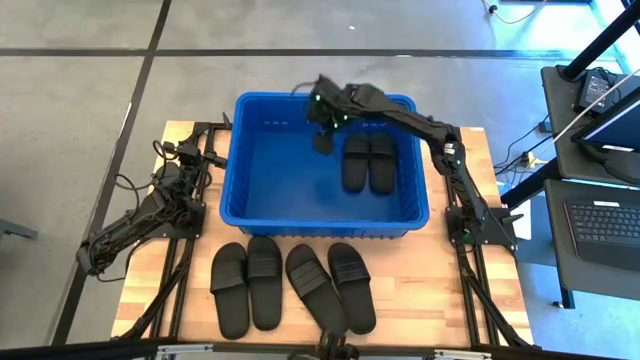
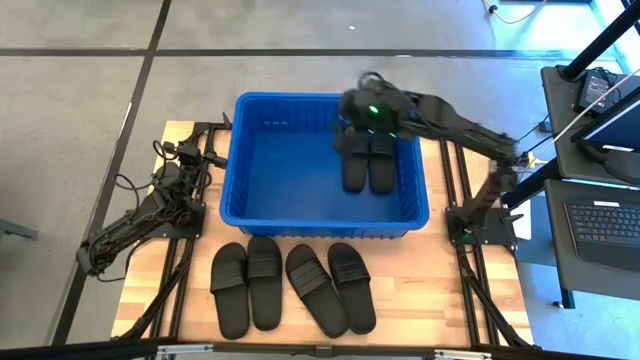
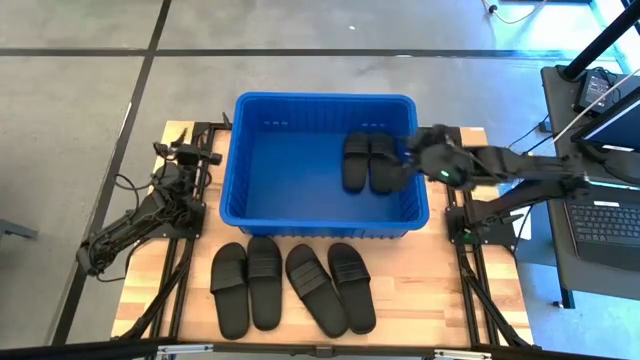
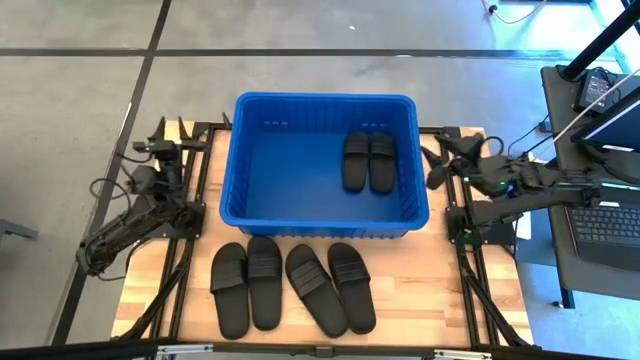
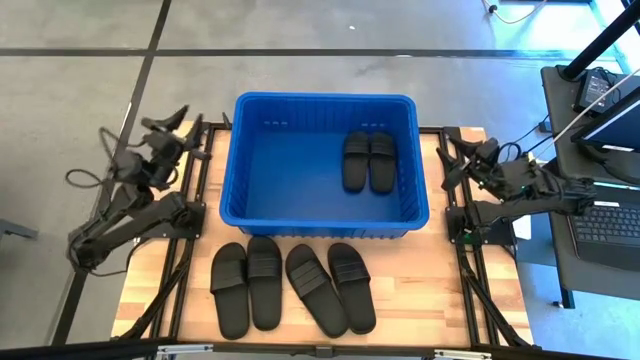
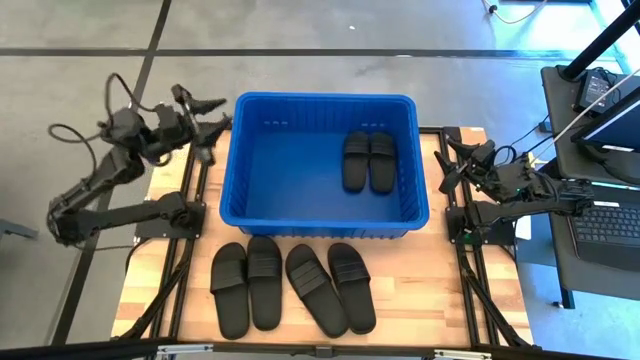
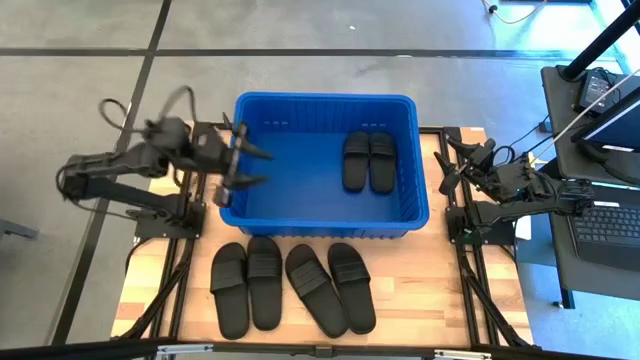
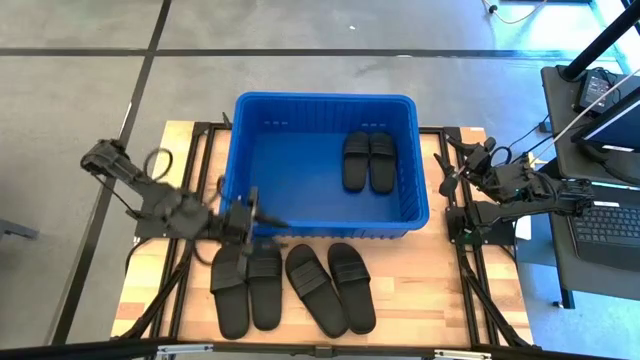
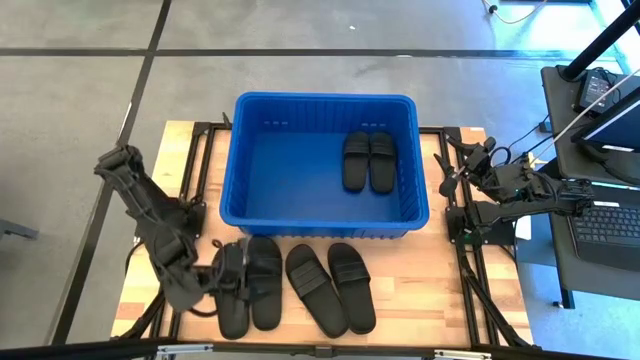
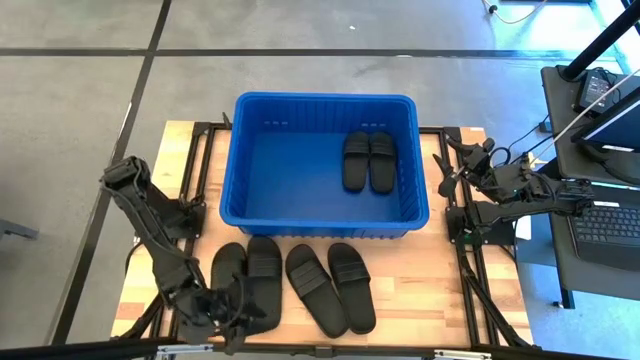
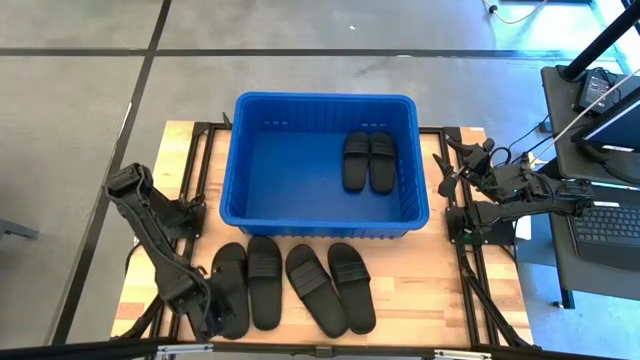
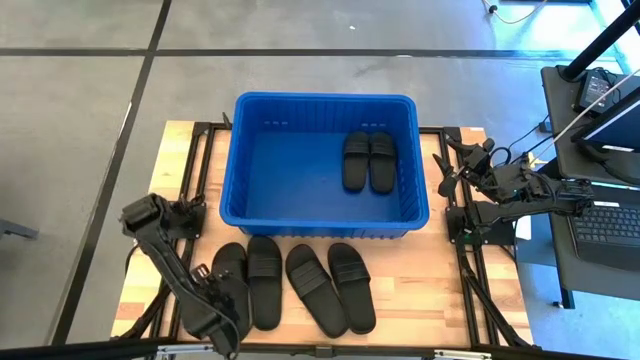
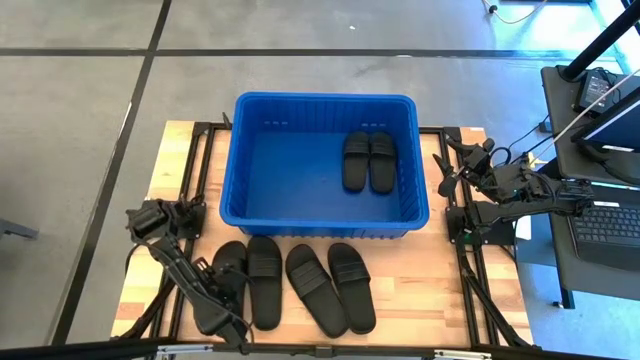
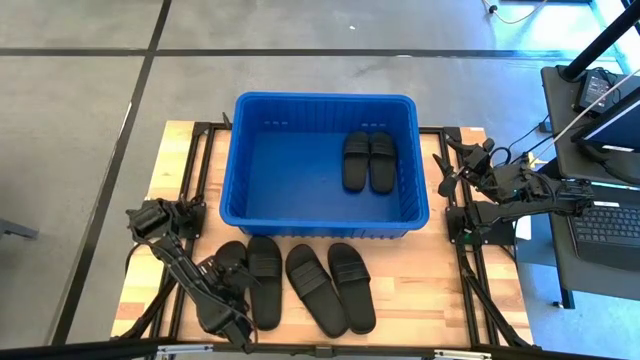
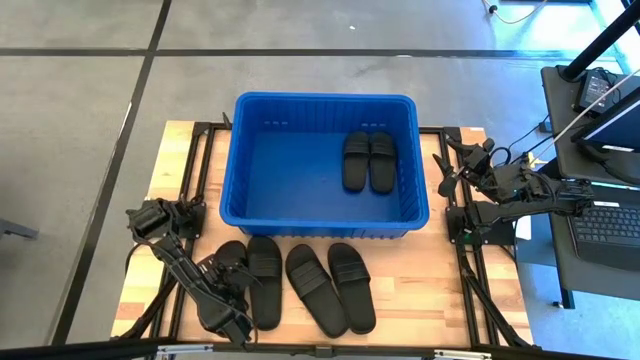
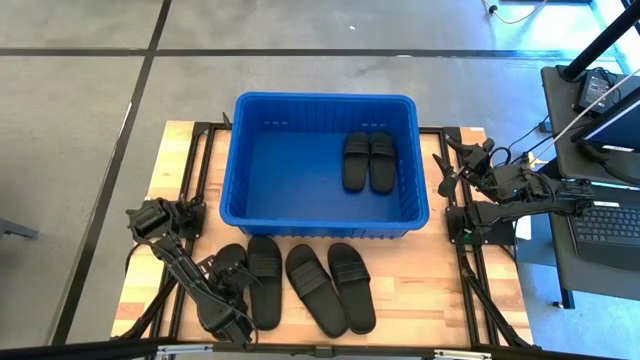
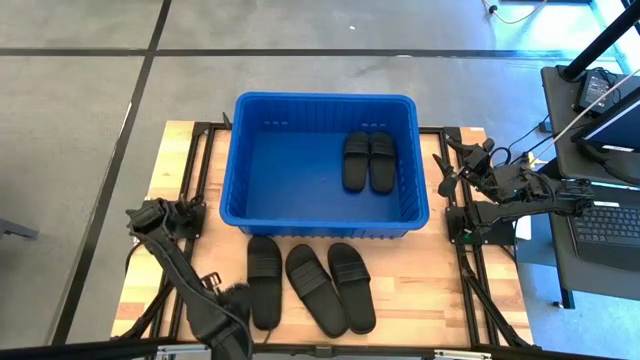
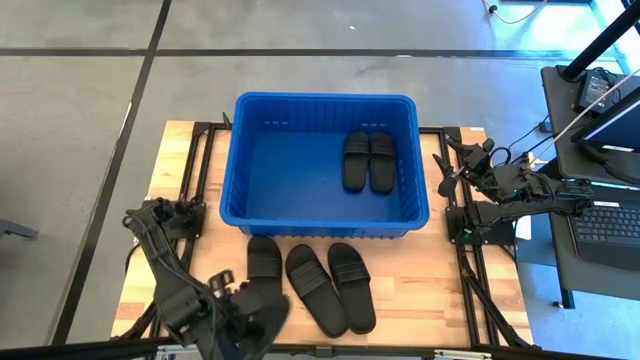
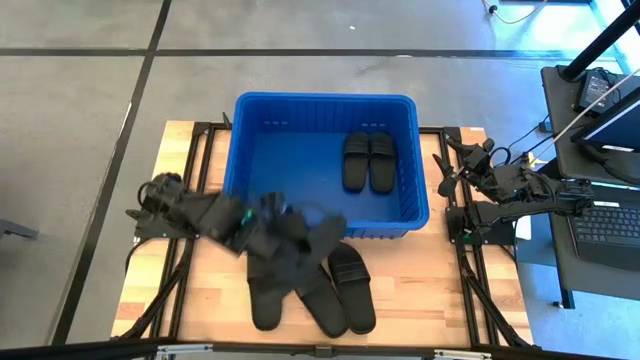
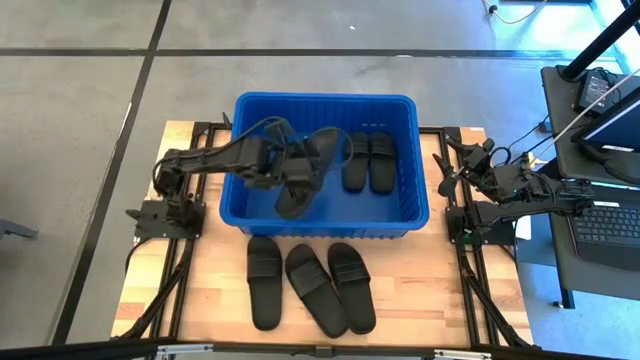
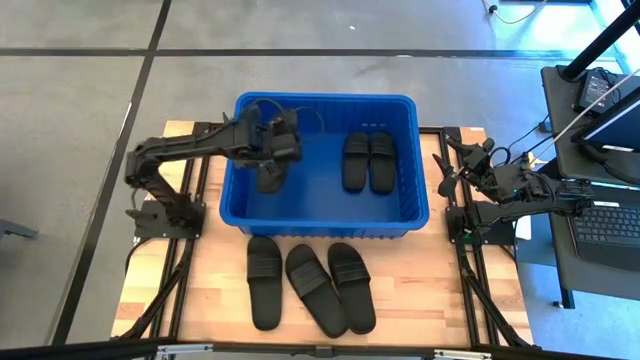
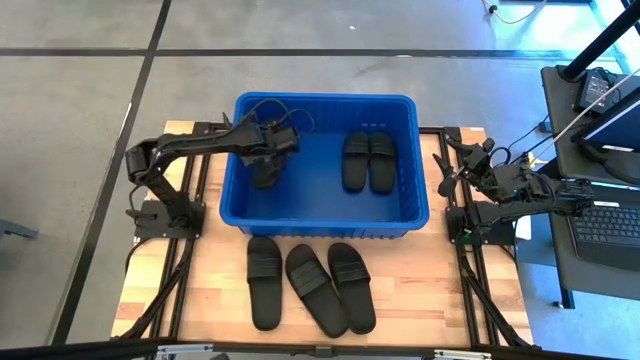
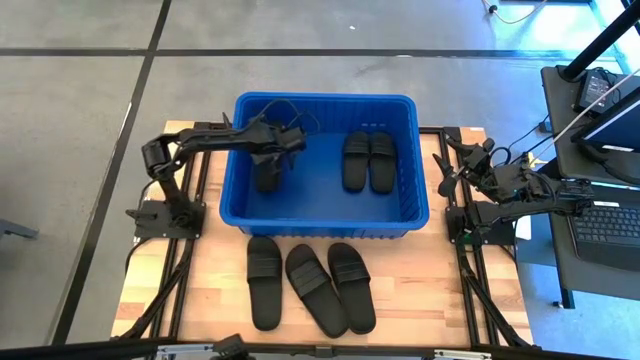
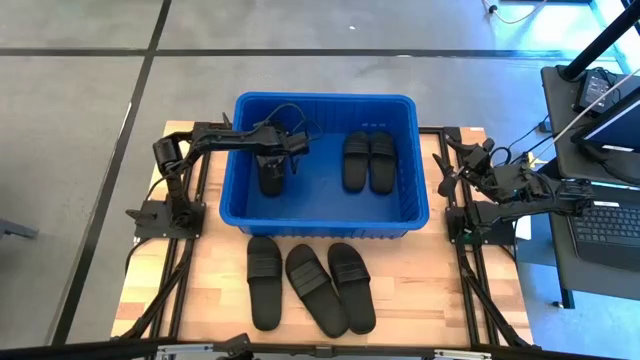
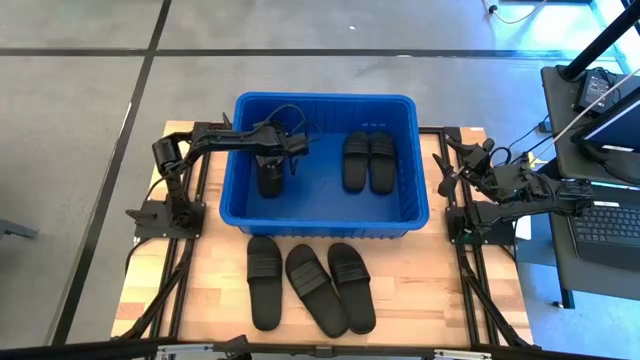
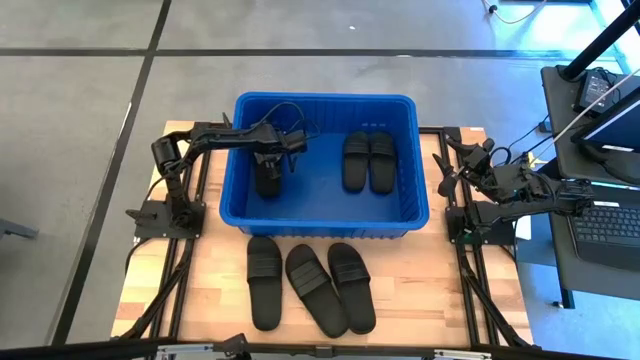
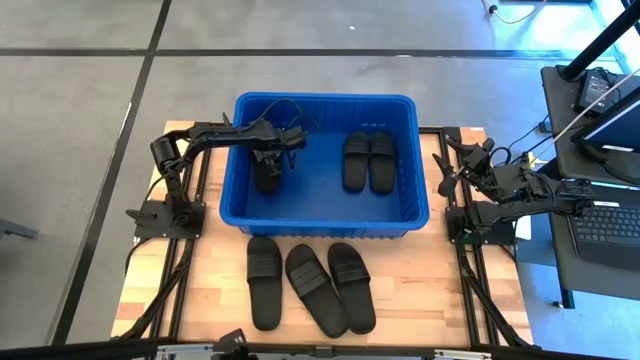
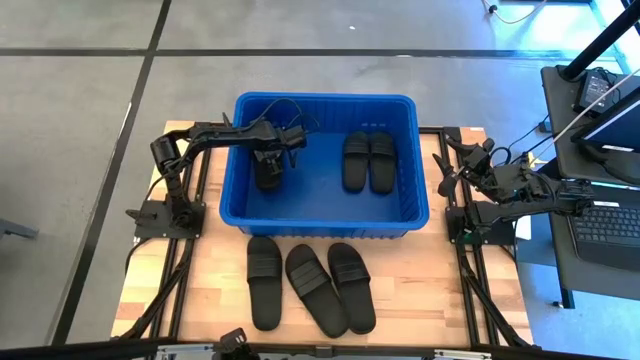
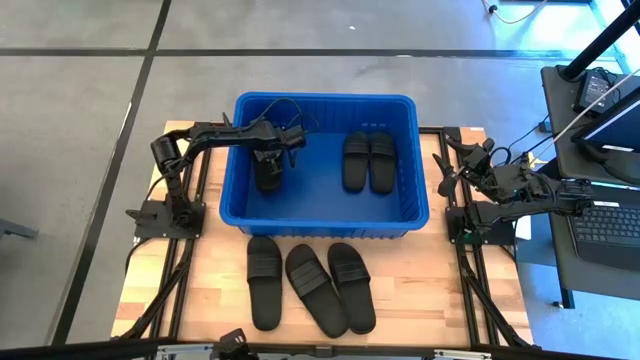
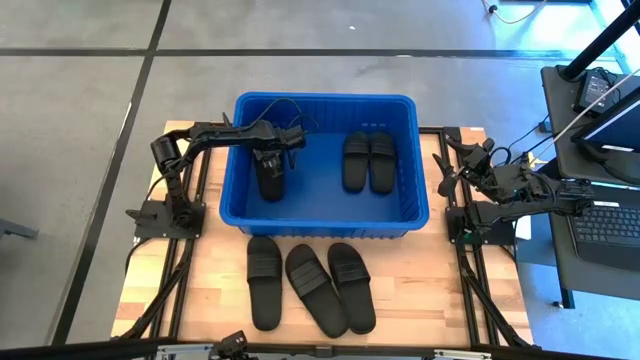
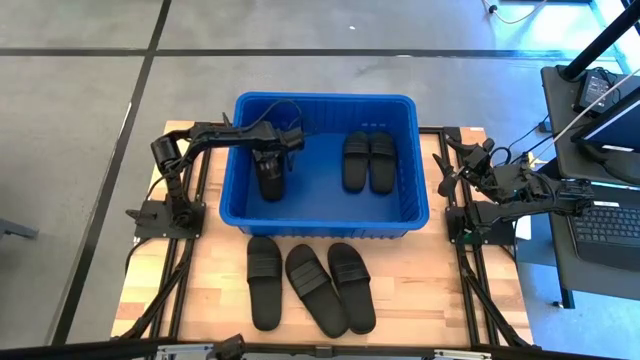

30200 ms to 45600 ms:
Task: Pick and place slides into bin
Put the black slide into the blue organizer bin

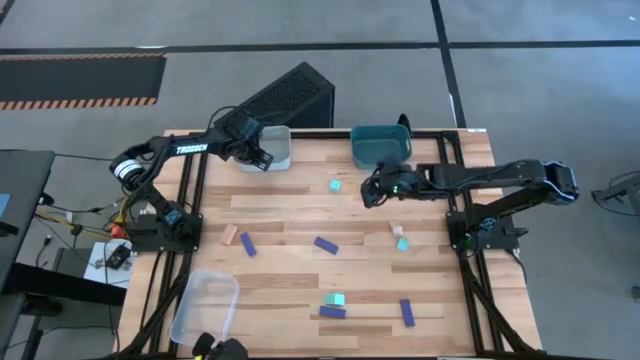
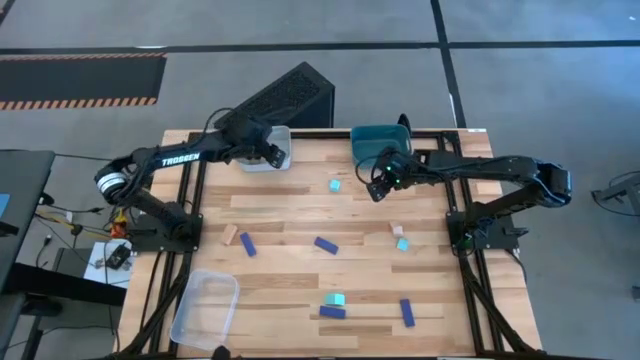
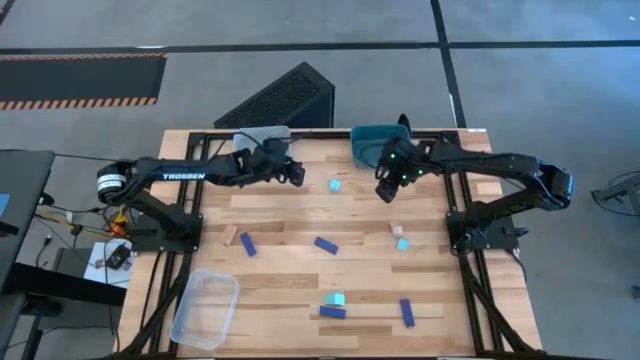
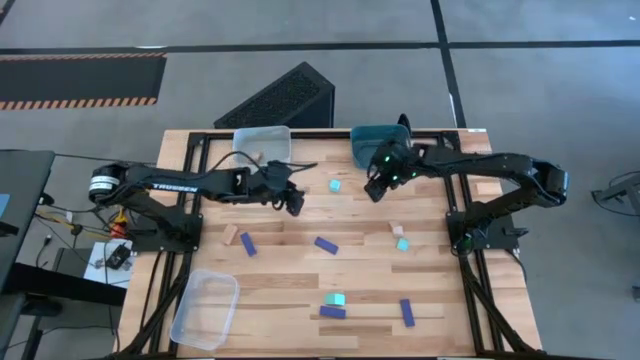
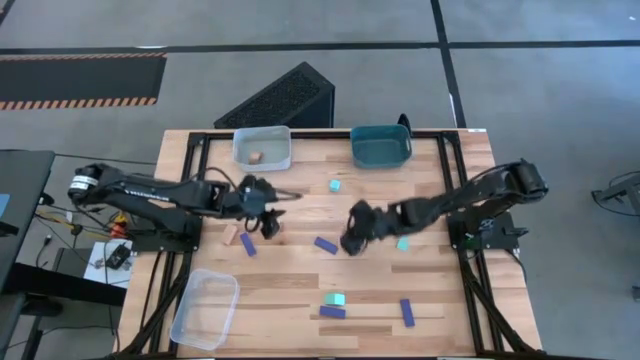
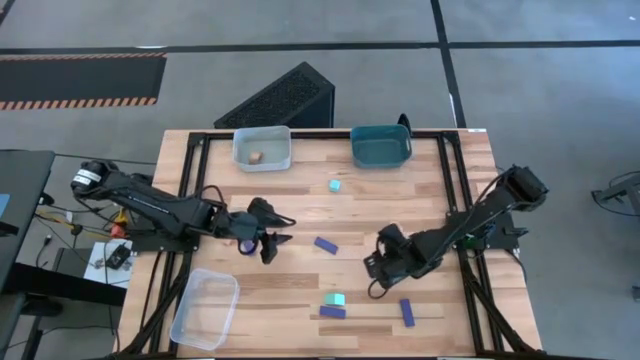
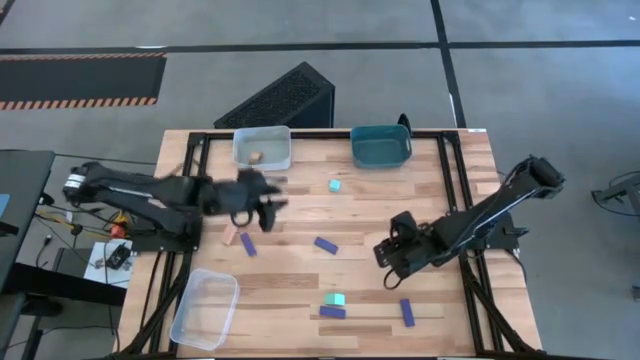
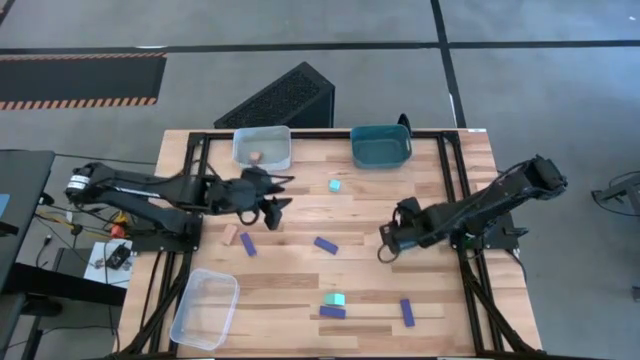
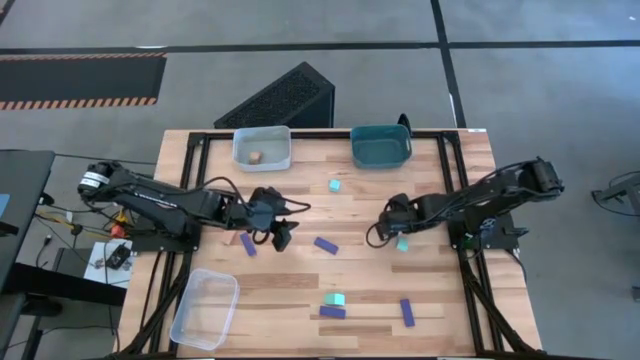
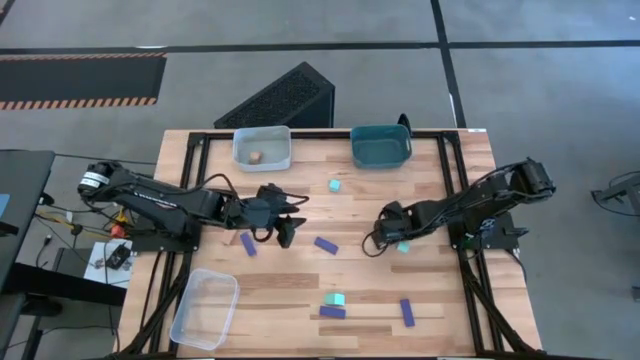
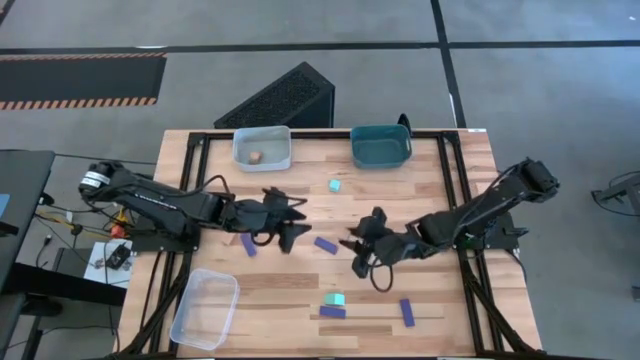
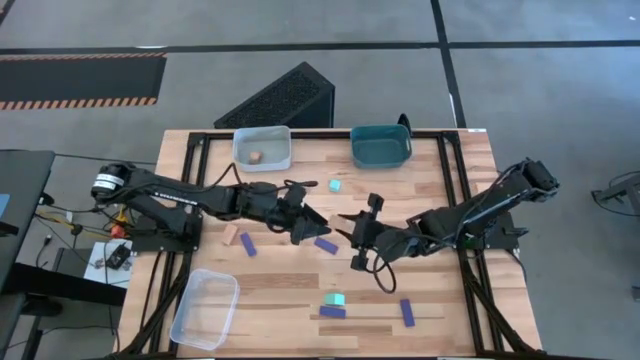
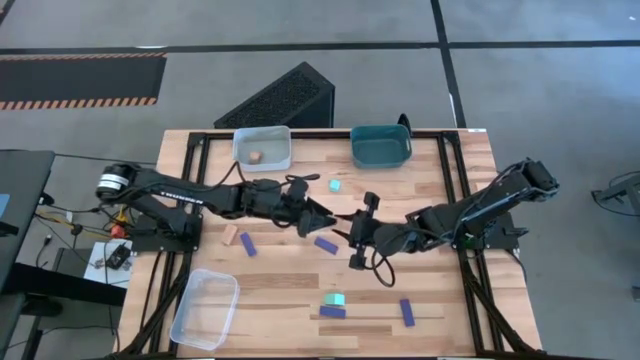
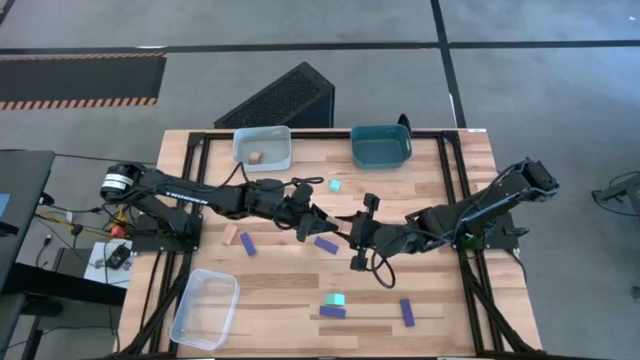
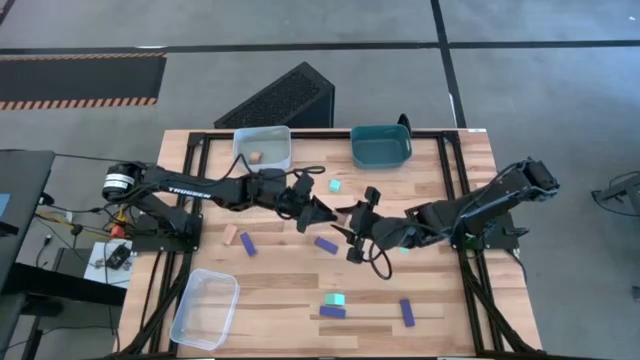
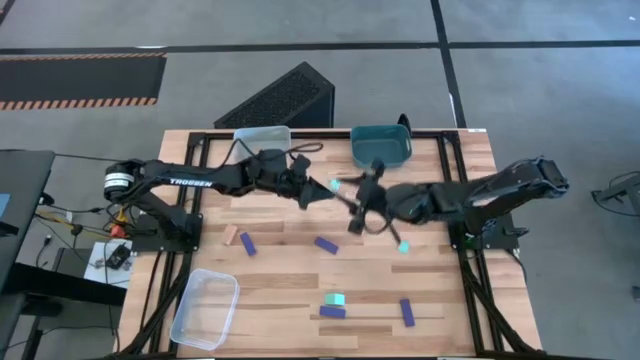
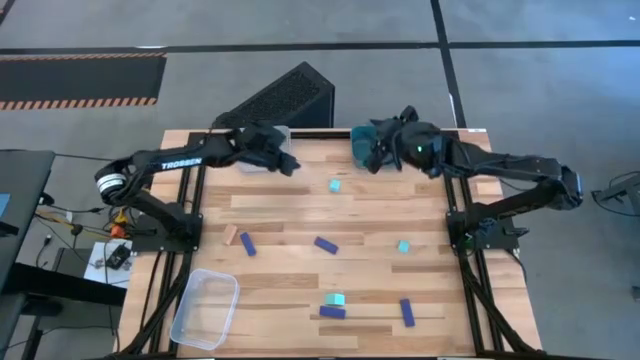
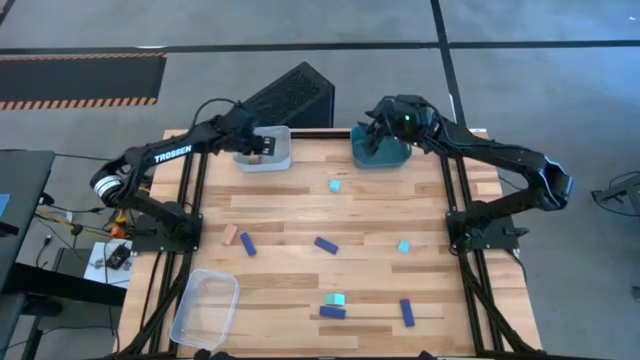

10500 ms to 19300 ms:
Task: Sort & place blocks by color
Put the right brown block into the white bin
